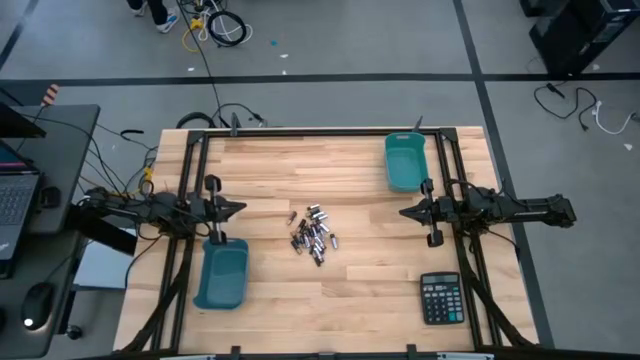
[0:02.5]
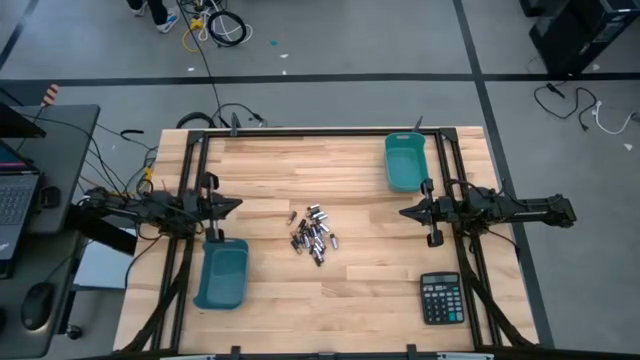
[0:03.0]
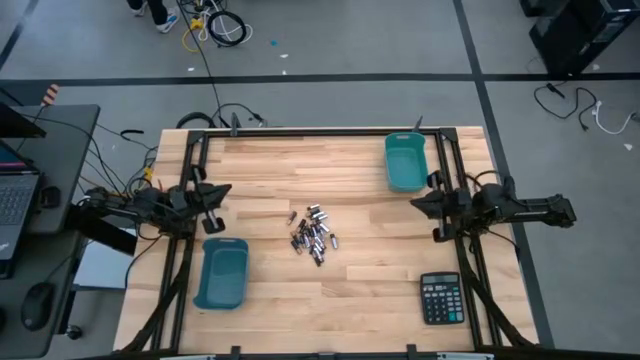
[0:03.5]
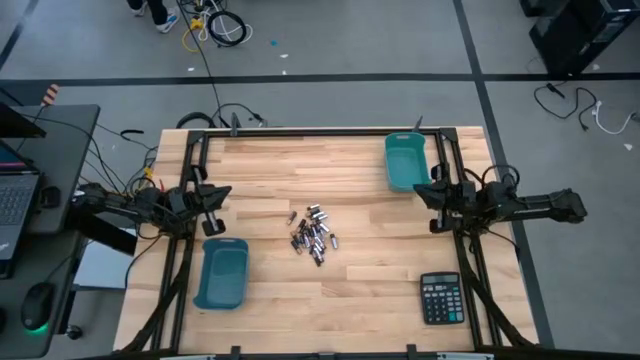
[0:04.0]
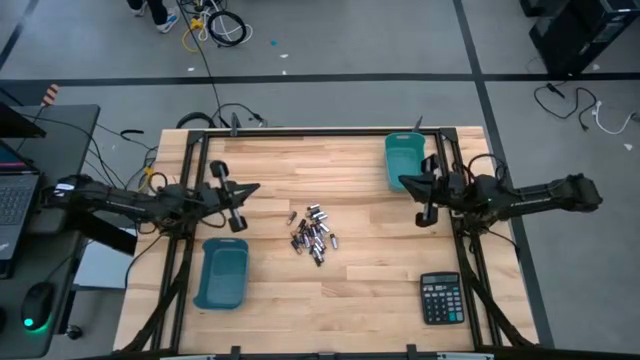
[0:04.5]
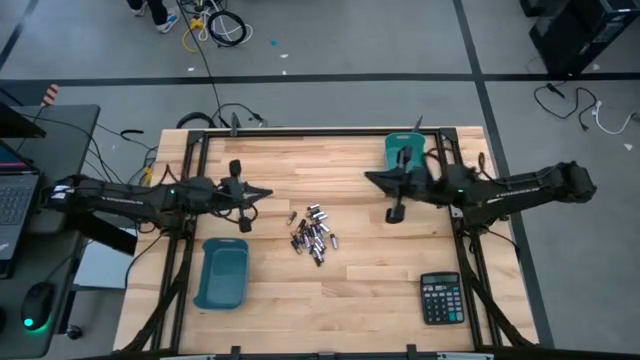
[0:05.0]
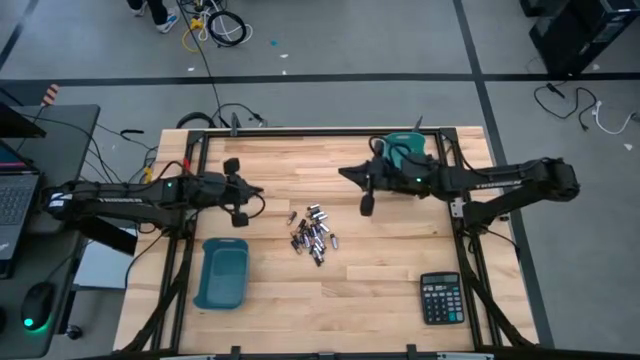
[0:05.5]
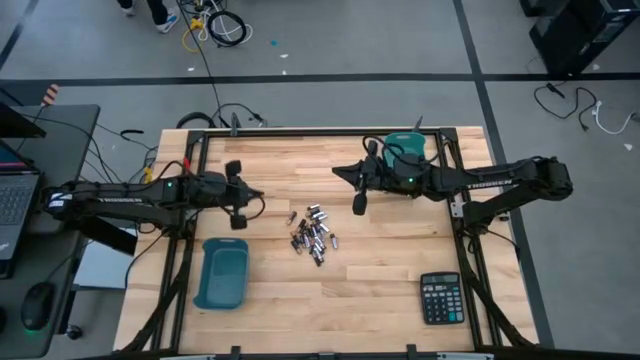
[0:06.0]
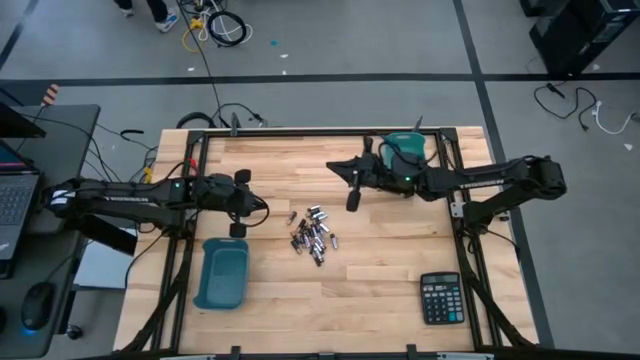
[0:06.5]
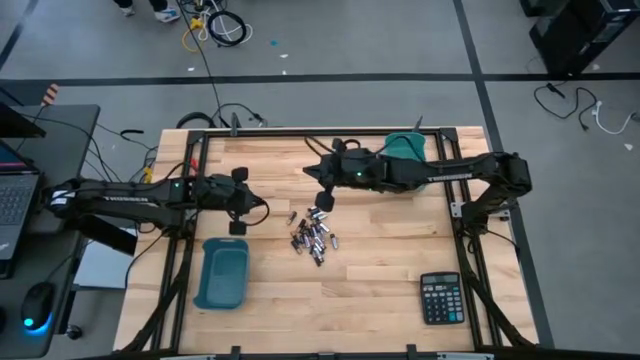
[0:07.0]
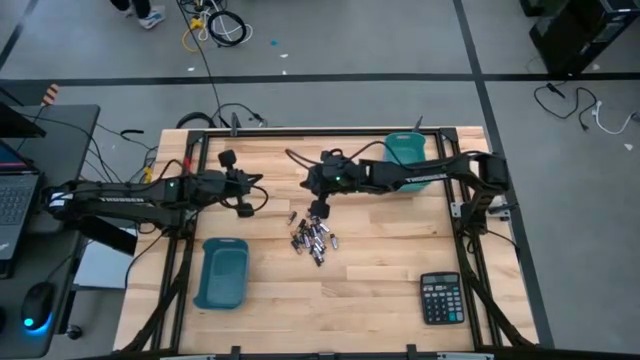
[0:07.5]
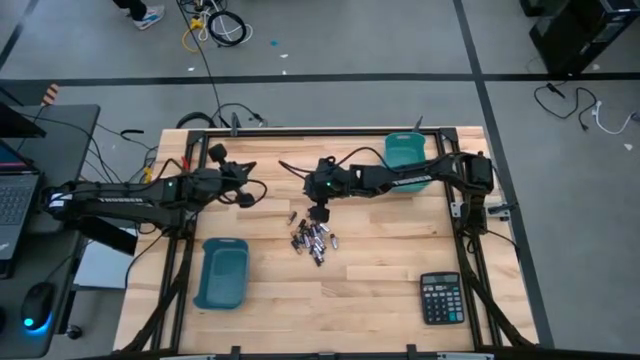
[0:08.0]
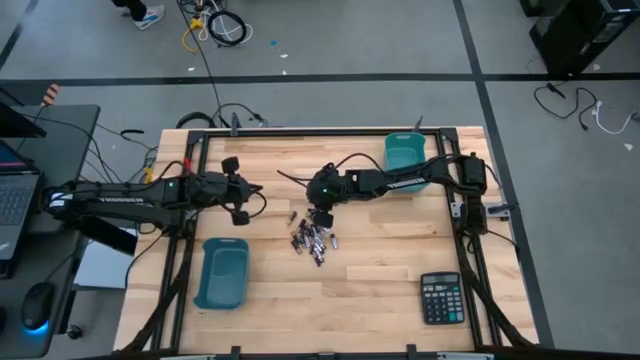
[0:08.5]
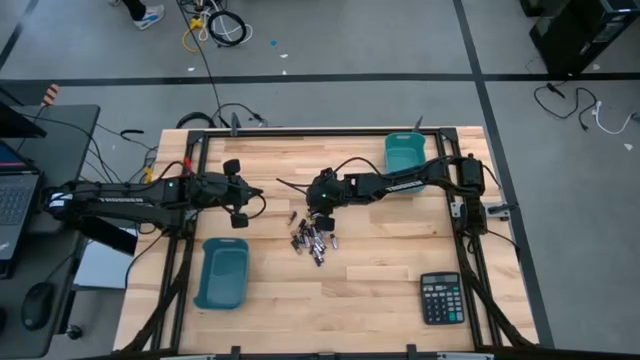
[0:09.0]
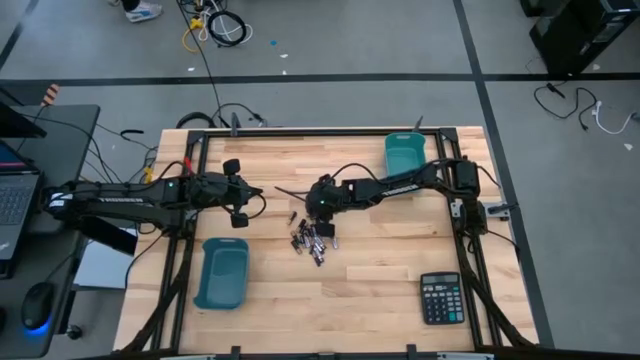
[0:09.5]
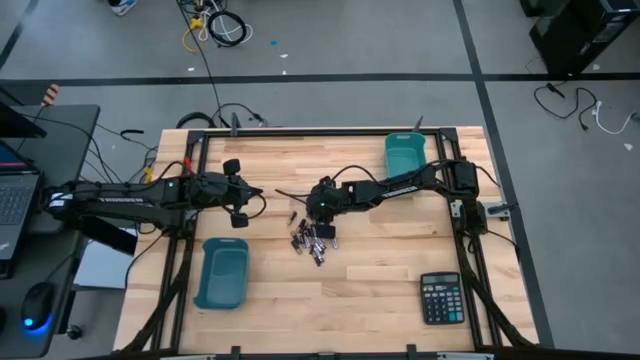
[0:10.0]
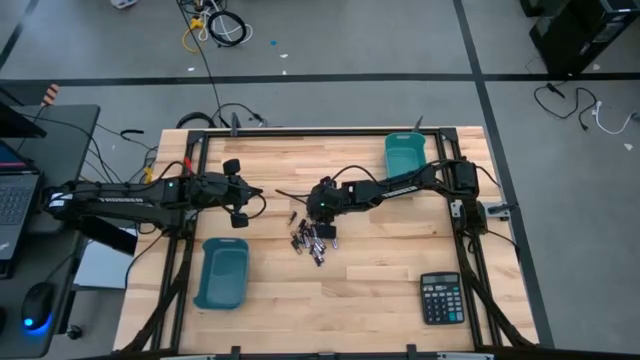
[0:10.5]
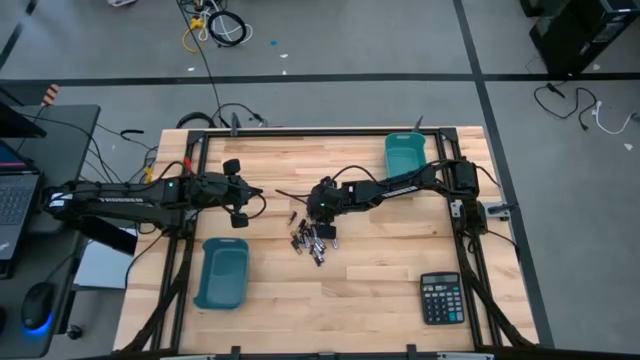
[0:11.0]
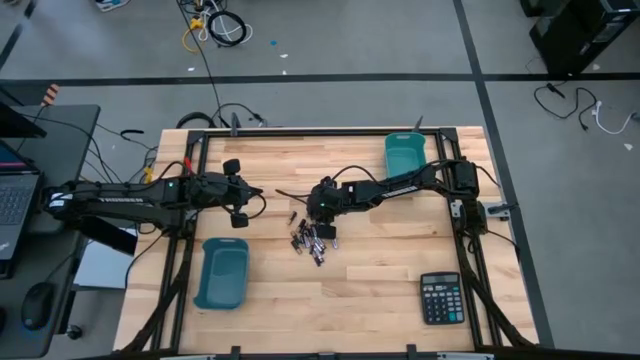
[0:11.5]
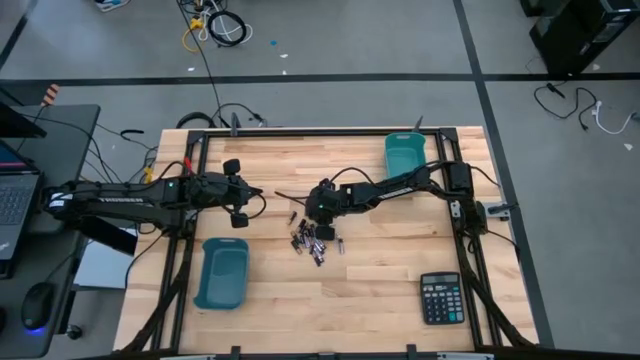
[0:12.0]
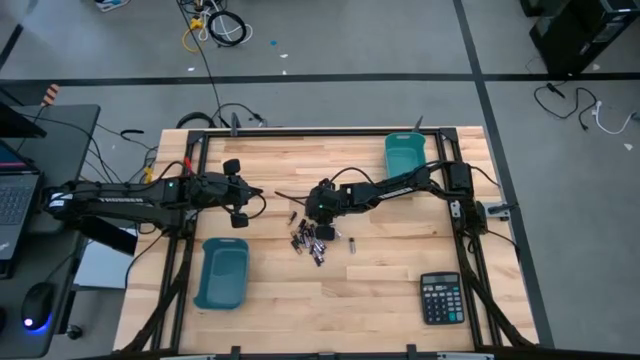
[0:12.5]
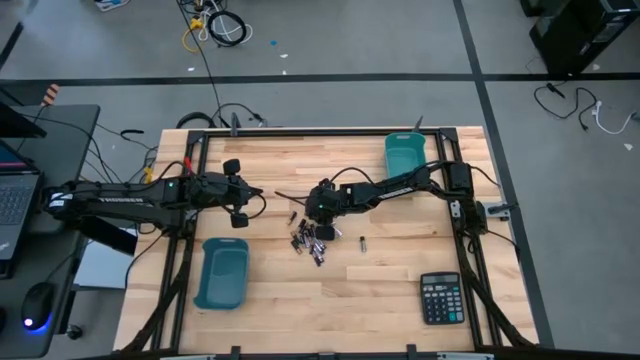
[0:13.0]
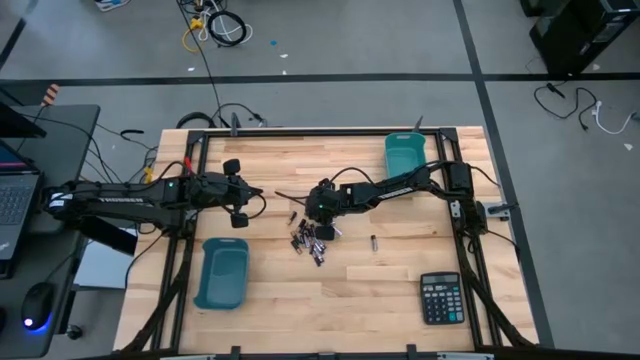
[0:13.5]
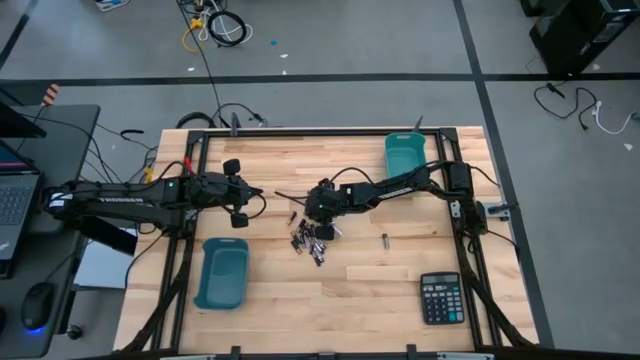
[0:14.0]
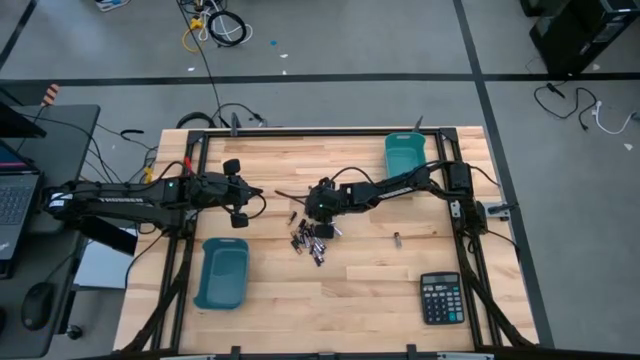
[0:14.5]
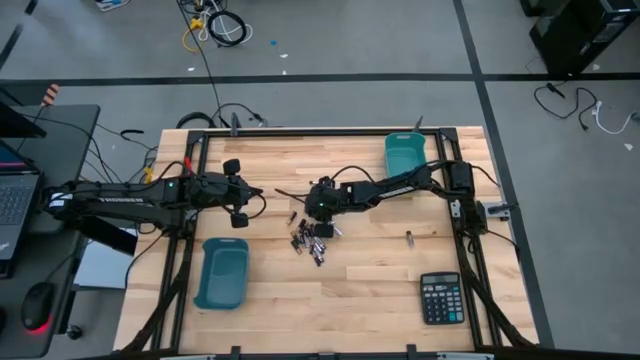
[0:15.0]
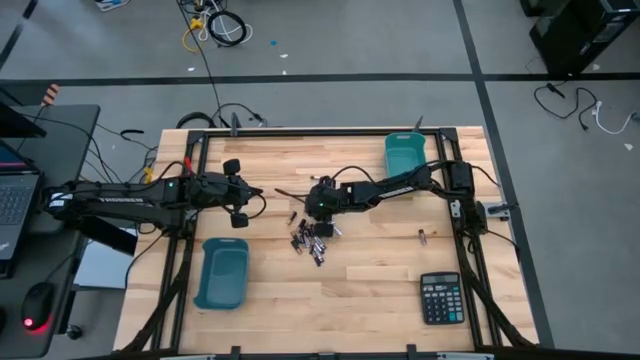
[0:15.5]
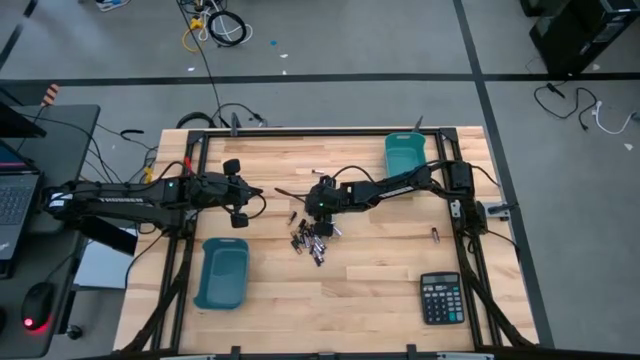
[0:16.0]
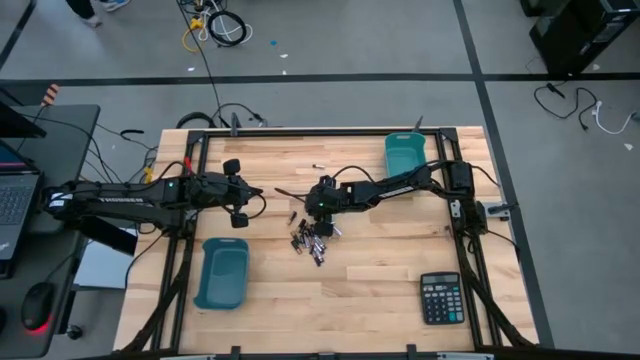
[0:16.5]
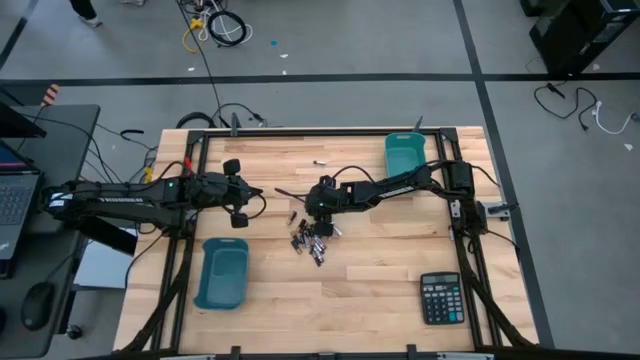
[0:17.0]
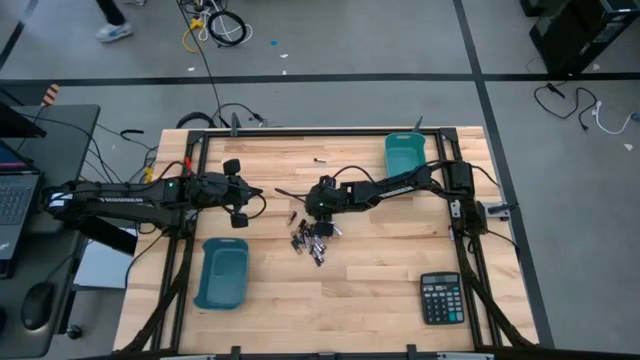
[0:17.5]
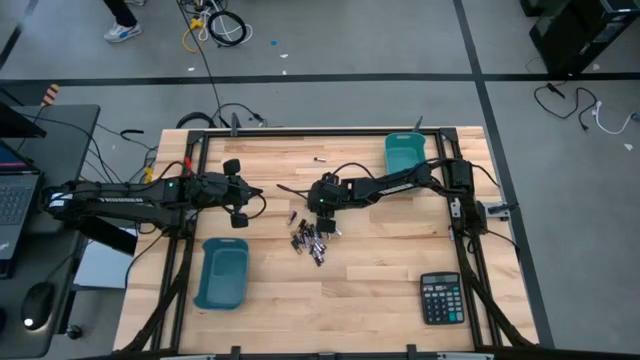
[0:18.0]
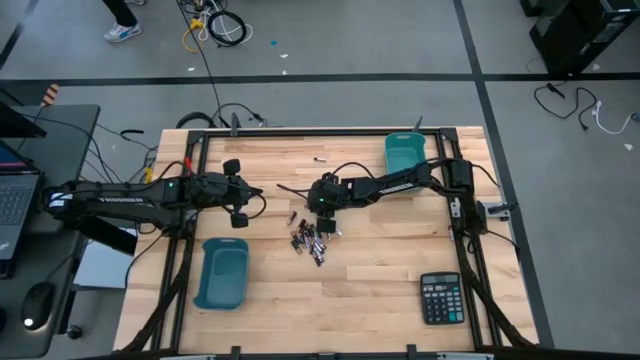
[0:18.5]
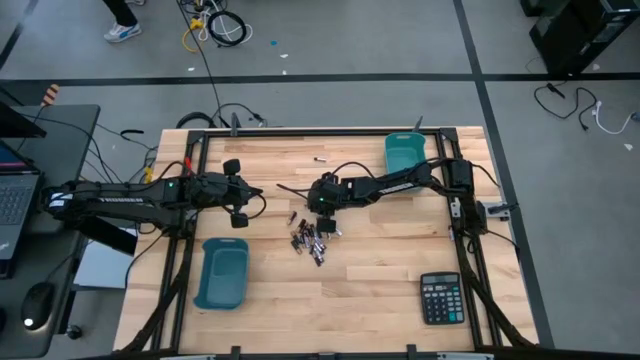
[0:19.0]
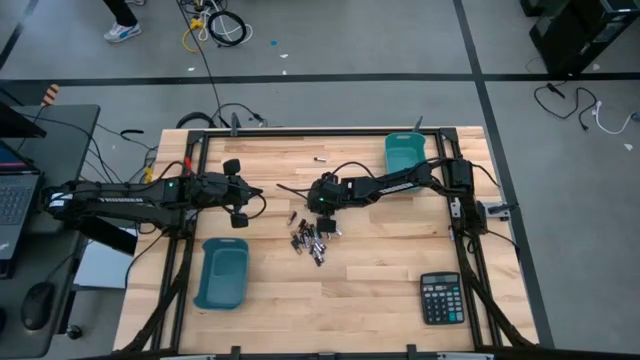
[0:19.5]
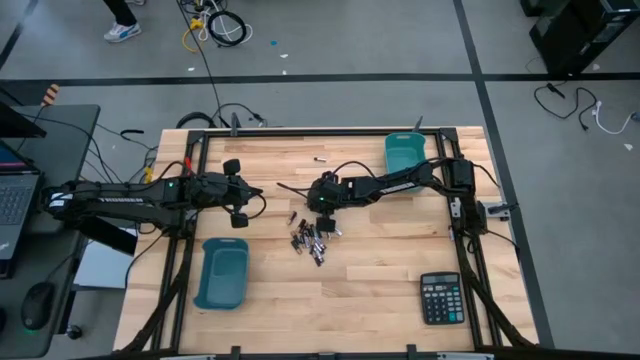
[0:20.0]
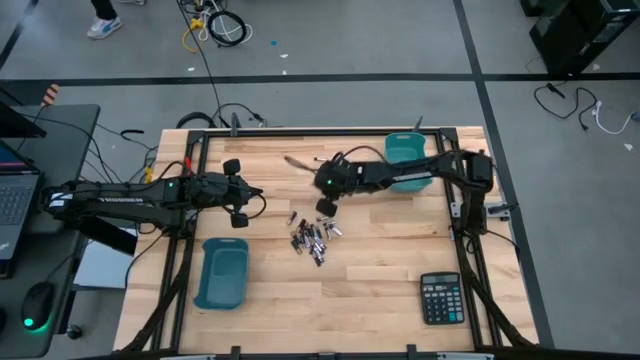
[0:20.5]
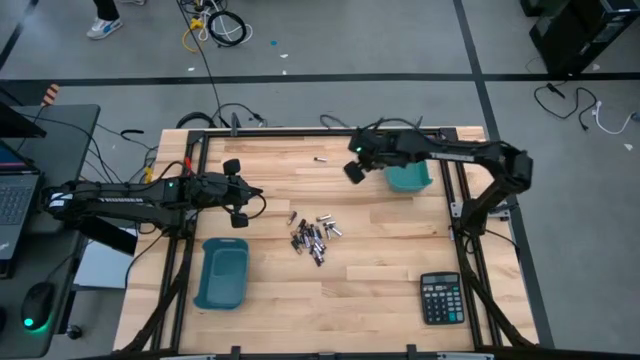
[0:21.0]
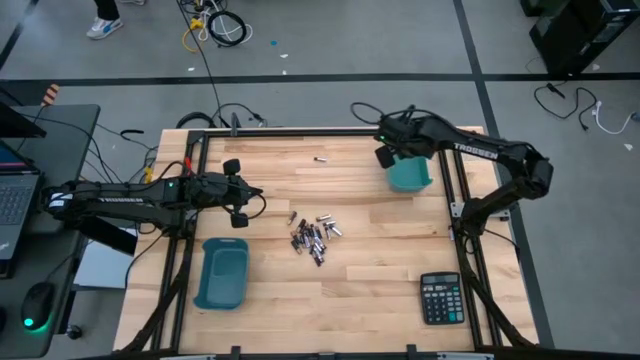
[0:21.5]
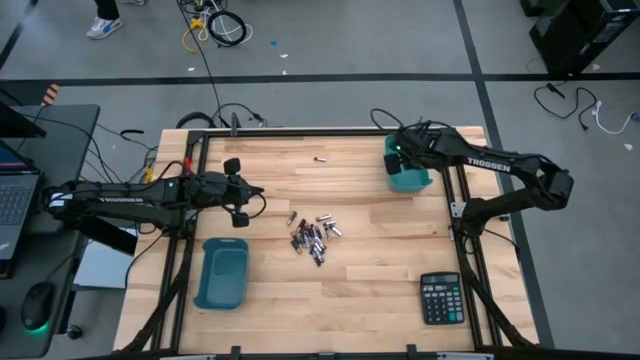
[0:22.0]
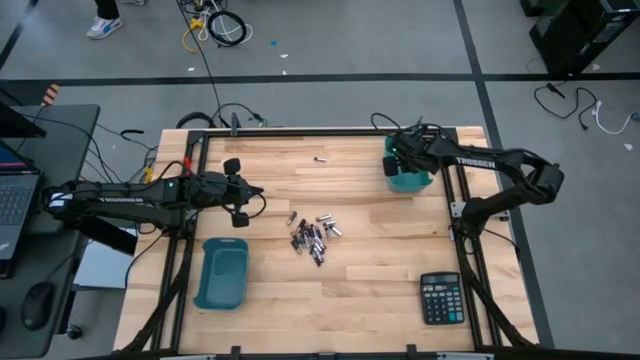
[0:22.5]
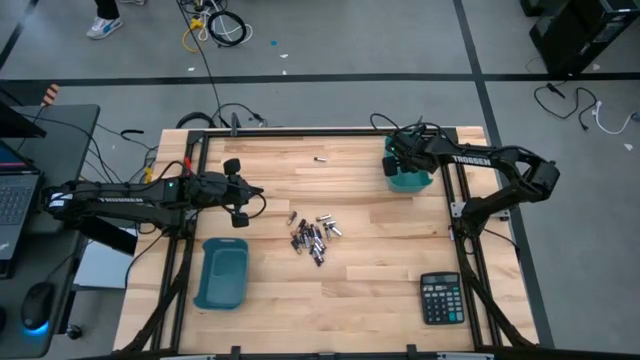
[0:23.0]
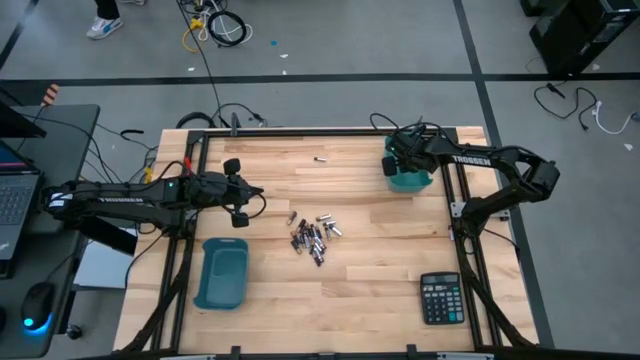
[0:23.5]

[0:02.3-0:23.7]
Task: Sort batteries
Put the black battery into the green bin
